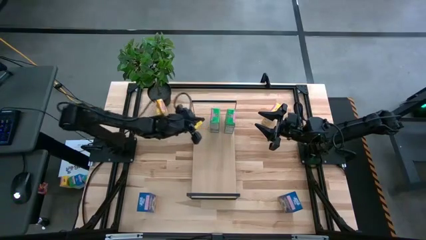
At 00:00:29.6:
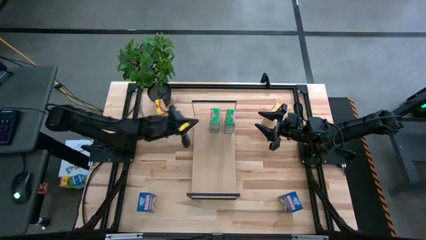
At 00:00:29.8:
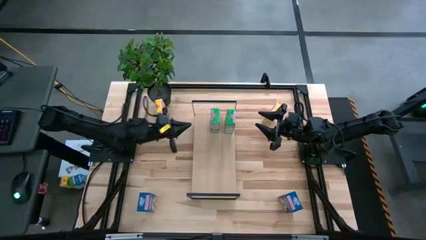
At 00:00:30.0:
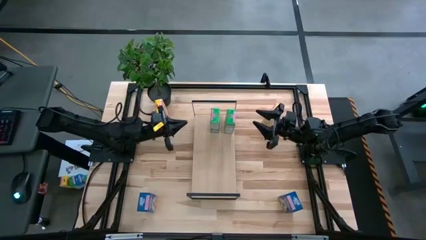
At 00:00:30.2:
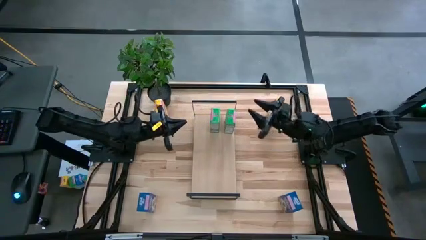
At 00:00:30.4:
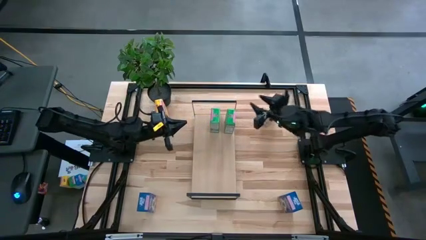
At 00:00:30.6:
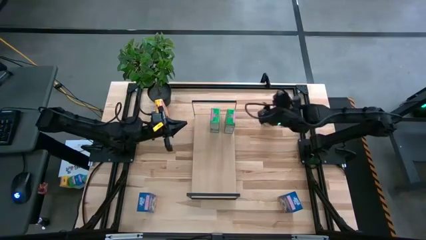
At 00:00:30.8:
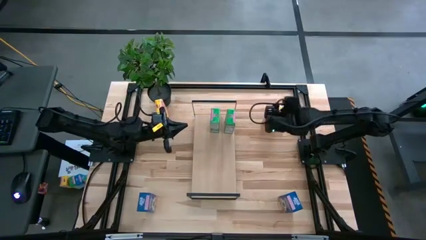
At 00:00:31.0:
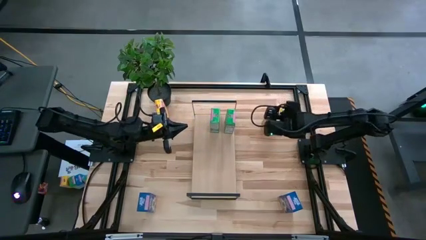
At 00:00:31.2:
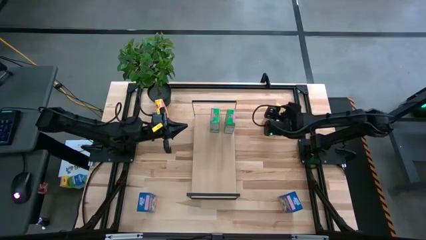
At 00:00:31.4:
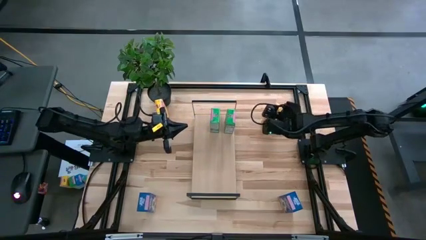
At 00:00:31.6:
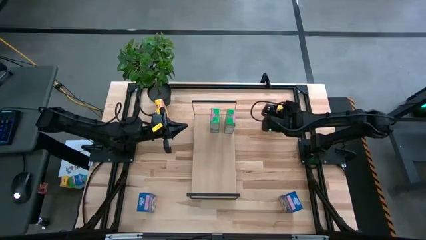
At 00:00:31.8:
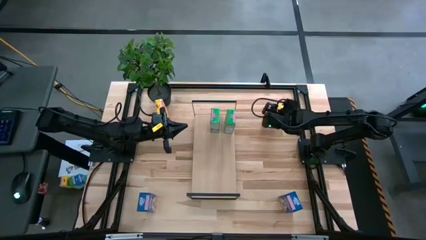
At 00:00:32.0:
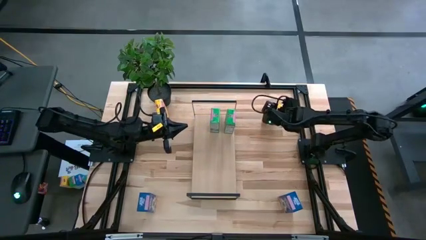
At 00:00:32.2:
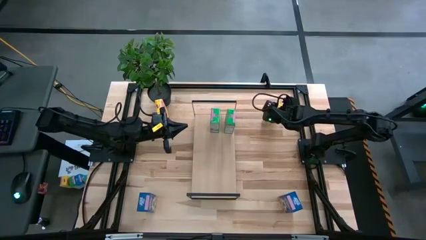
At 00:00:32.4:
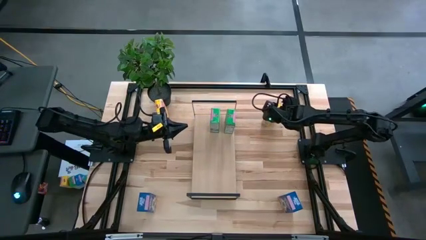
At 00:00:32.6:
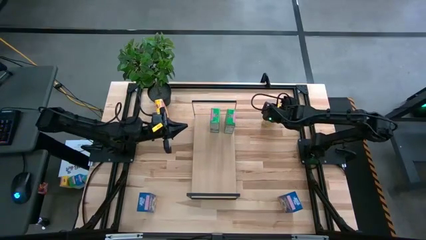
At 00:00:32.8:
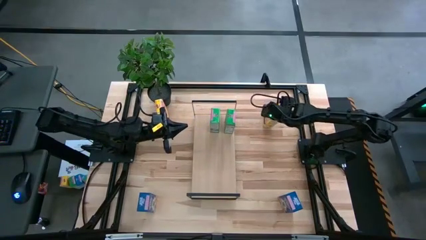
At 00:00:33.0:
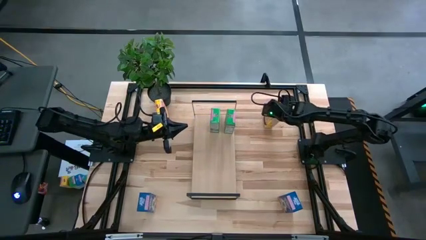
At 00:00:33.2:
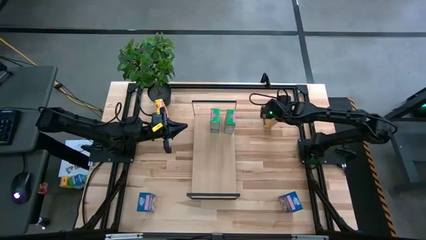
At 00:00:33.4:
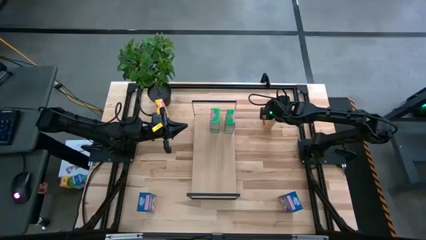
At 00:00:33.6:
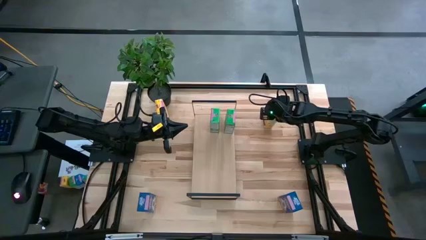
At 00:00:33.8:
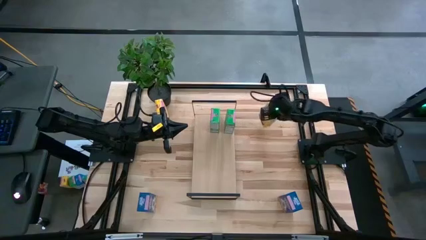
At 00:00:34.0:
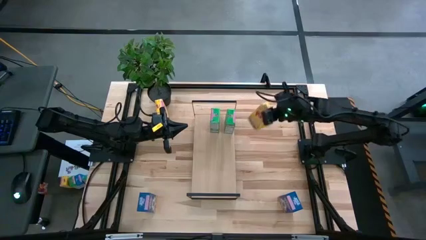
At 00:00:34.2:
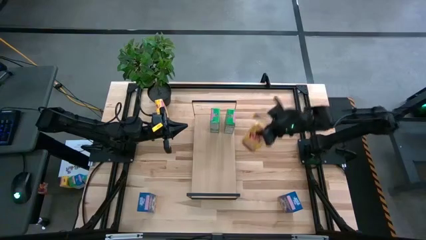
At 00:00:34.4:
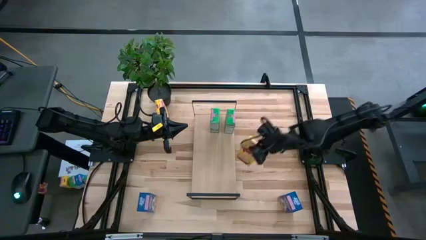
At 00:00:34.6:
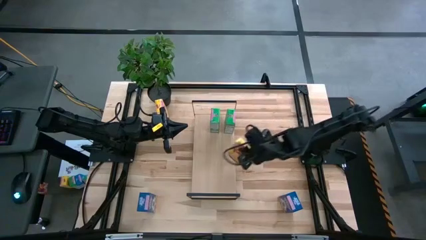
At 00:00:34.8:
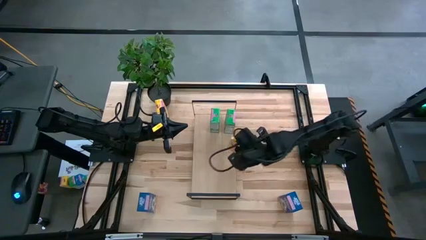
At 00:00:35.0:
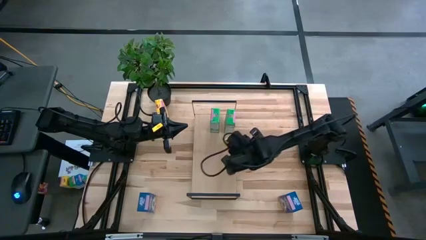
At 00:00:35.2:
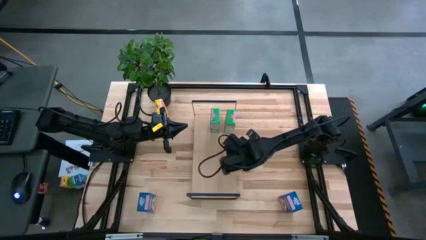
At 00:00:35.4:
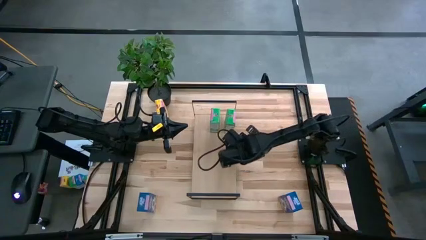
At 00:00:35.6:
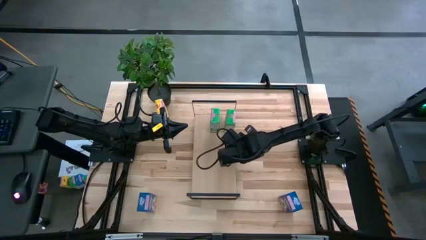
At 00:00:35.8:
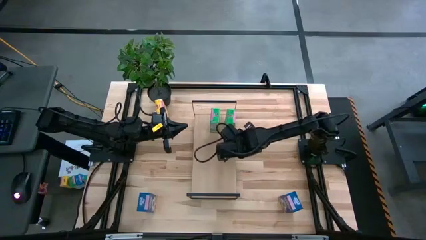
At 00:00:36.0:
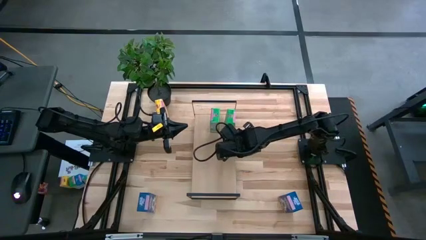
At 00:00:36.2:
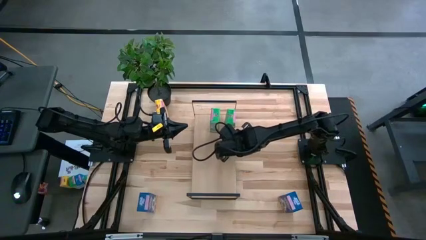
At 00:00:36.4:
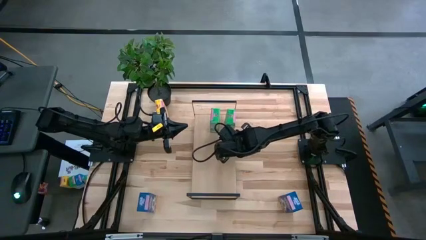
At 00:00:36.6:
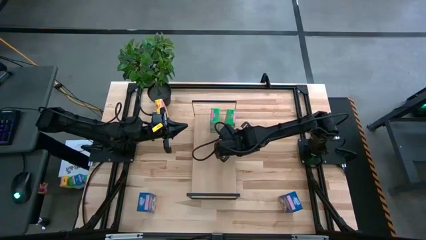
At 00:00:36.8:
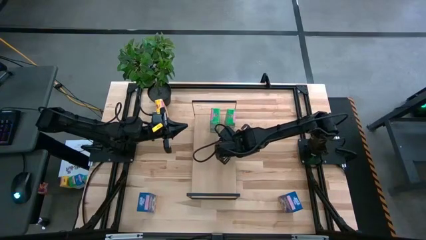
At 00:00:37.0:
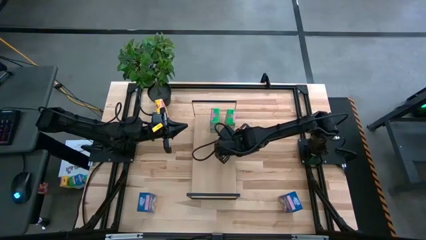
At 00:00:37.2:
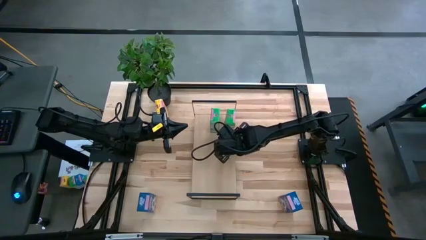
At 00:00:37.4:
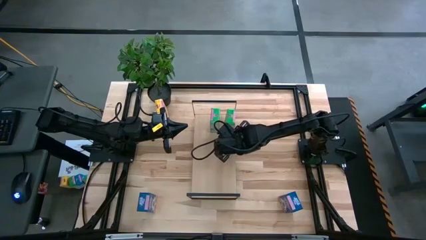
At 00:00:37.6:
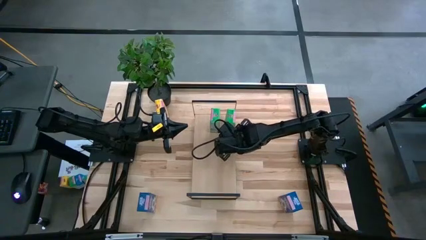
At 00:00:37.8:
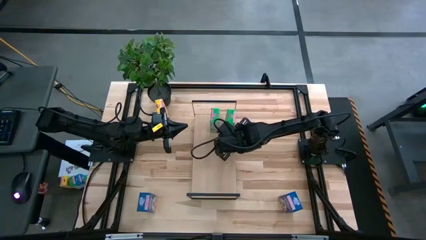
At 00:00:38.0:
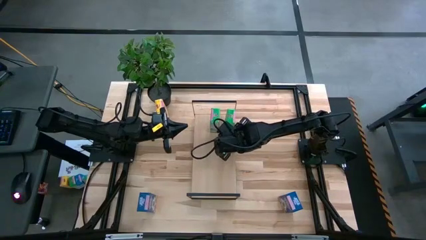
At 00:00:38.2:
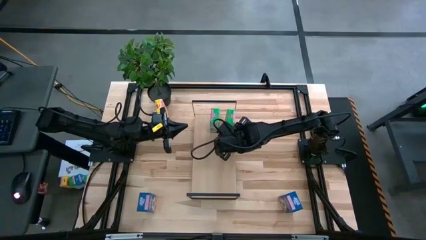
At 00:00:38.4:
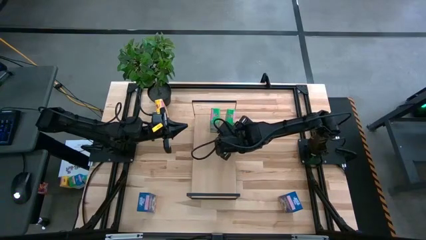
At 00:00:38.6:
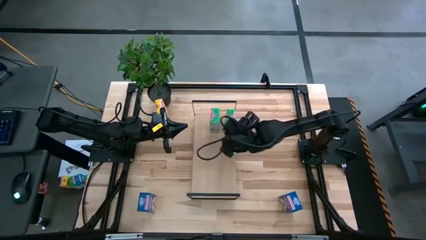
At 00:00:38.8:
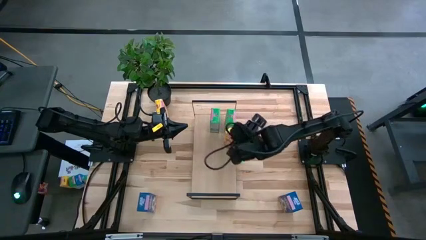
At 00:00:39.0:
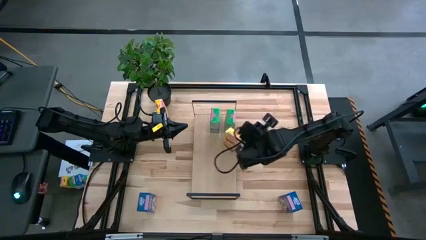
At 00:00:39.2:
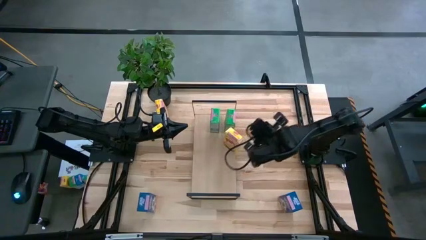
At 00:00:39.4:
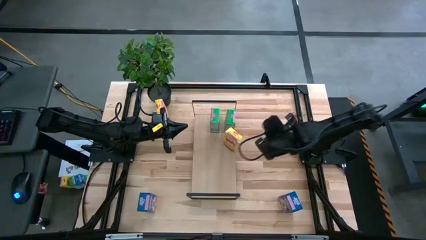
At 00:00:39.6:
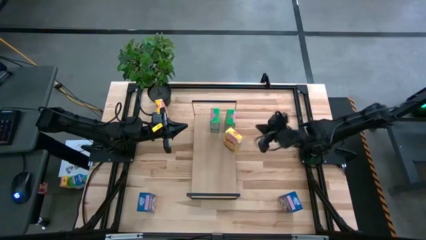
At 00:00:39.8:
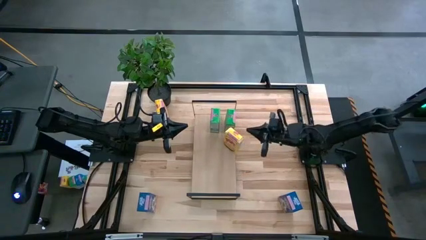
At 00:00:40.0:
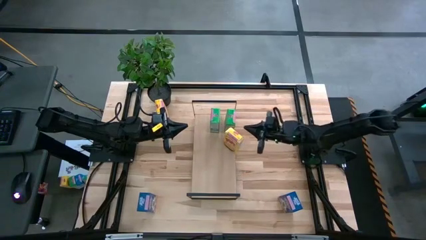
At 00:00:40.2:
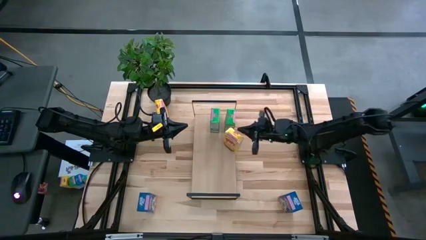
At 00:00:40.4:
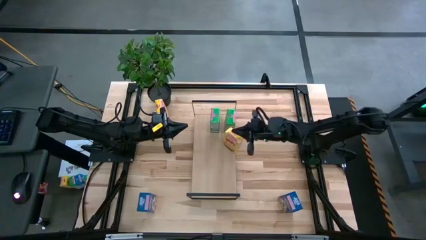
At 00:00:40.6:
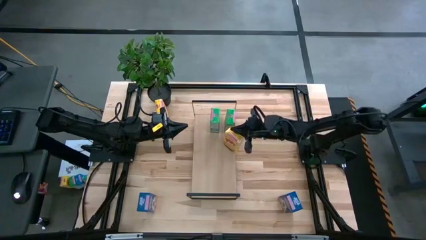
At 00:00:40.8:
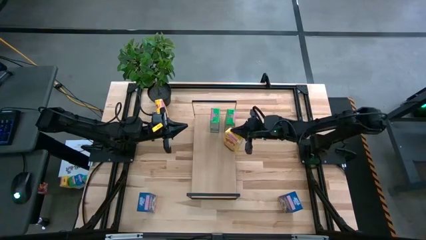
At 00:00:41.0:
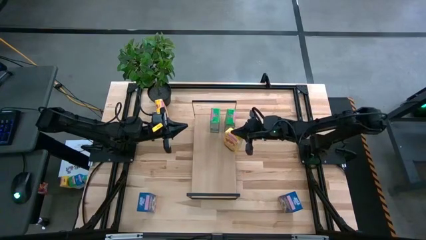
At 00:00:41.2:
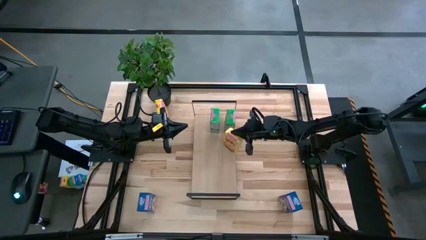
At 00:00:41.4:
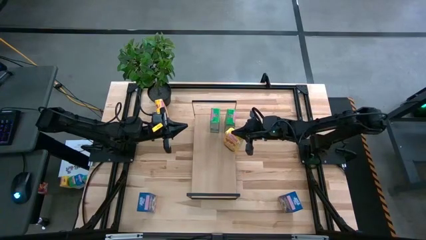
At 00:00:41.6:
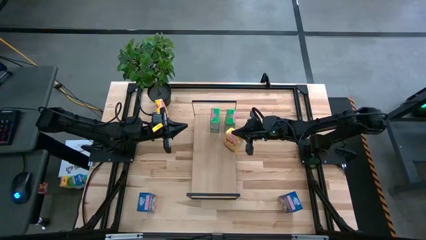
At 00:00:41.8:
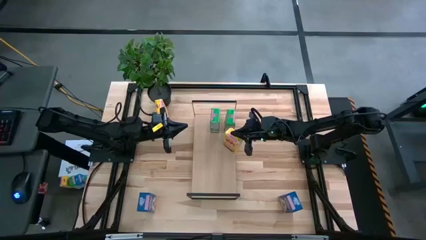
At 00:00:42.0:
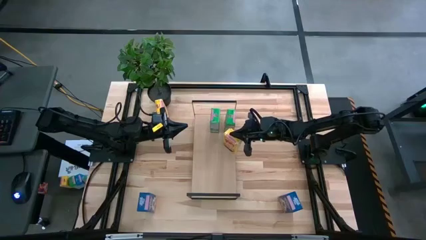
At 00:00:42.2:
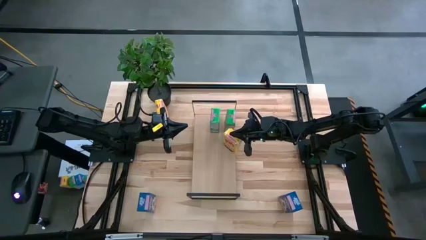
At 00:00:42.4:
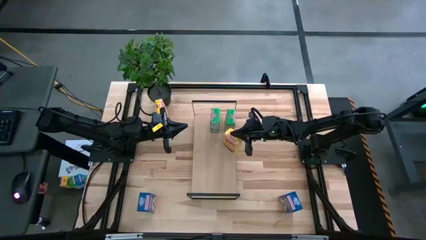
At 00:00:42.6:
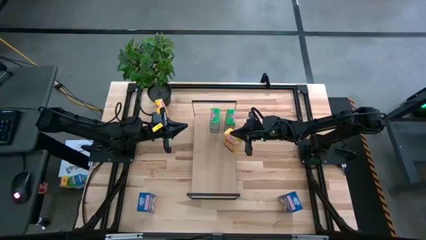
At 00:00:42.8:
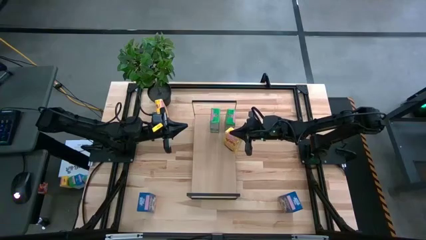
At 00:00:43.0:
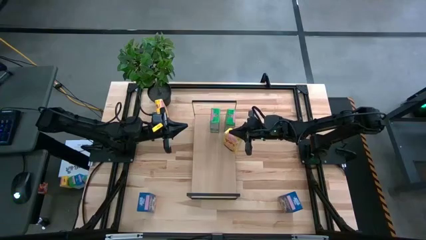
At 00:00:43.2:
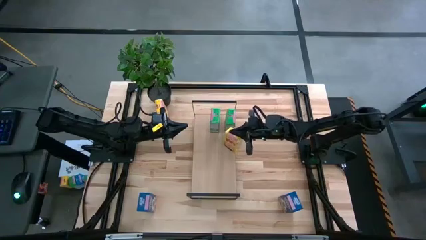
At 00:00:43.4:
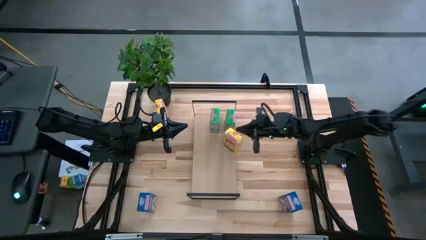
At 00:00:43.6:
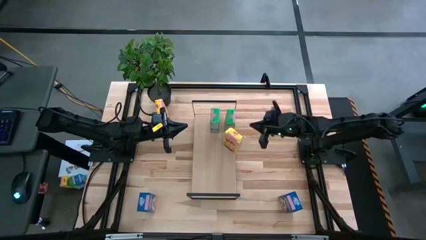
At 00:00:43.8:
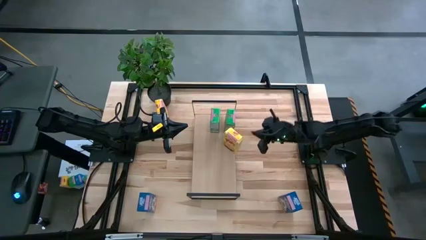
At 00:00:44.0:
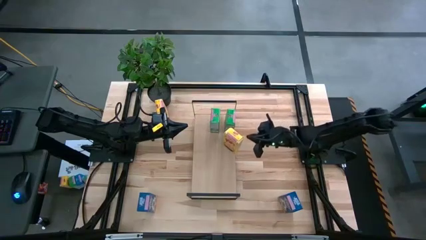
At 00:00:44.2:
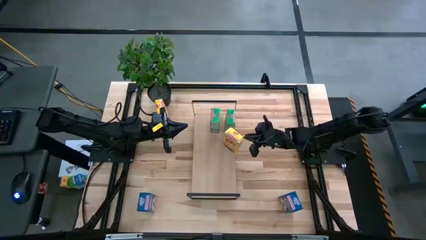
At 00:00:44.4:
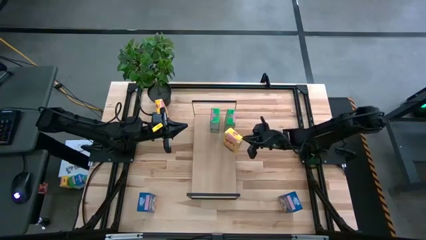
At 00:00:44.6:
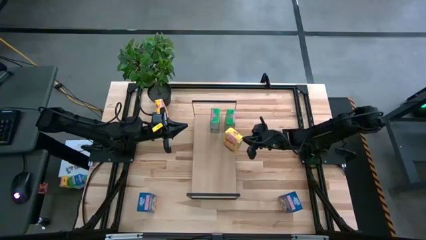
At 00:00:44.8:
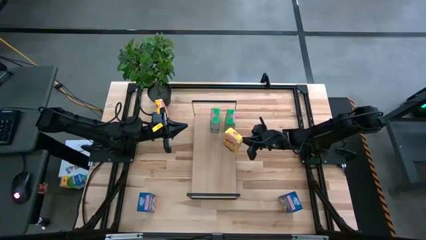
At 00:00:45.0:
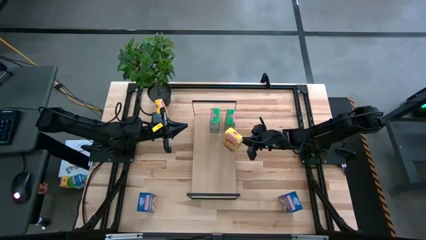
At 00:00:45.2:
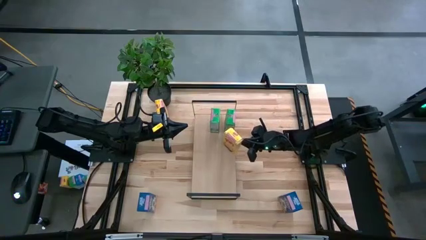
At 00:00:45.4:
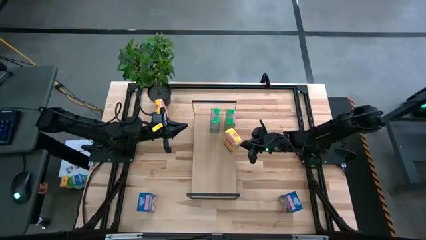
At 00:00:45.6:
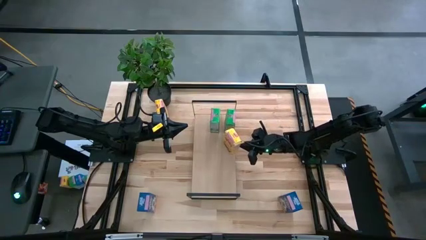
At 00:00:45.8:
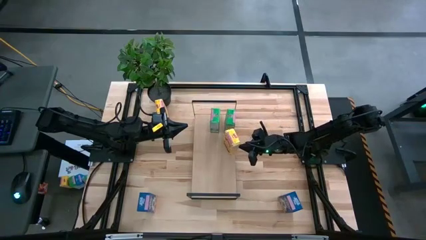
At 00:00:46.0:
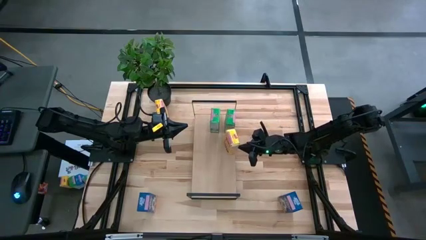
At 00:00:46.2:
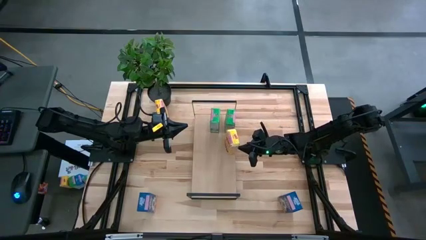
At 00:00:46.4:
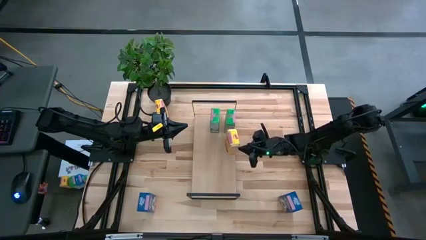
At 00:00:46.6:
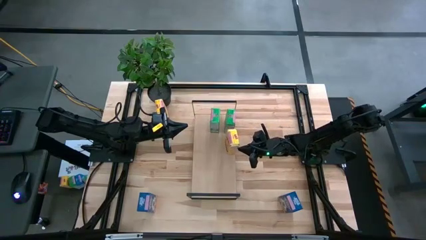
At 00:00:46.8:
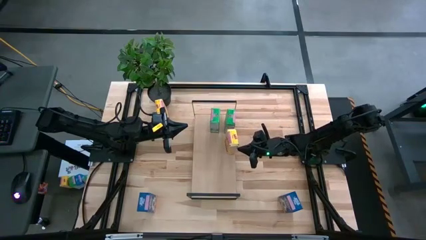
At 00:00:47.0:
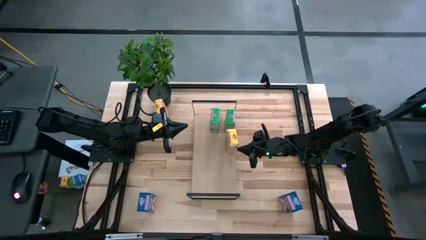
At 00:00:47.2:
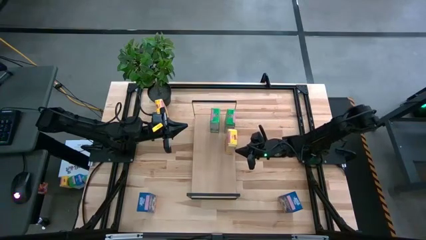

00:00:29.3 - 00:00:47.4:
Task: Stack cereal on shelf
Put the right yellow cereal box on the shelf
